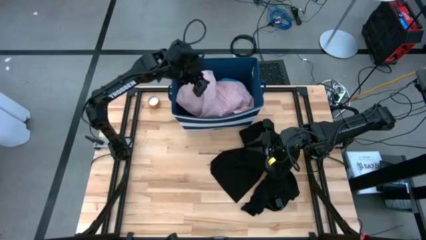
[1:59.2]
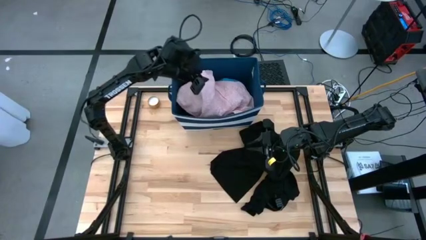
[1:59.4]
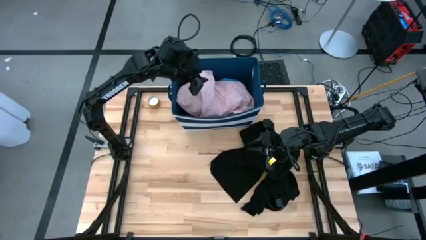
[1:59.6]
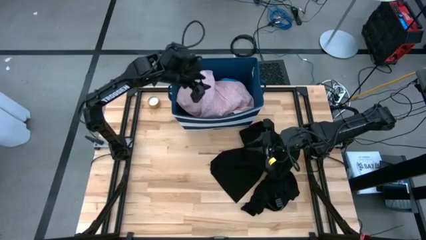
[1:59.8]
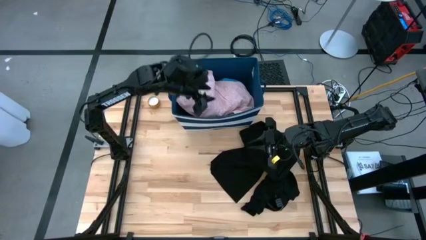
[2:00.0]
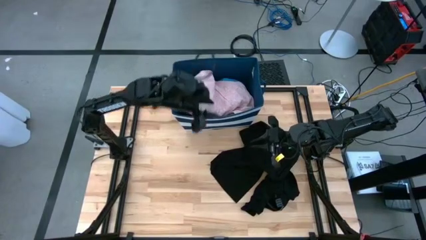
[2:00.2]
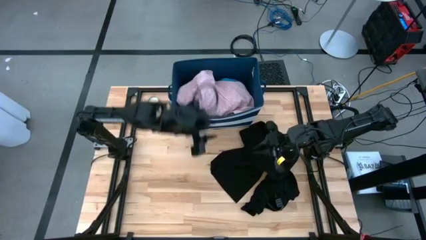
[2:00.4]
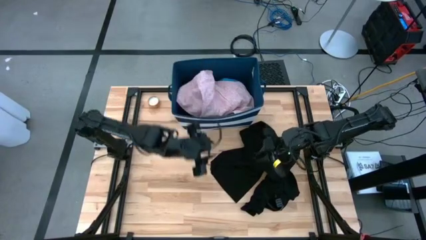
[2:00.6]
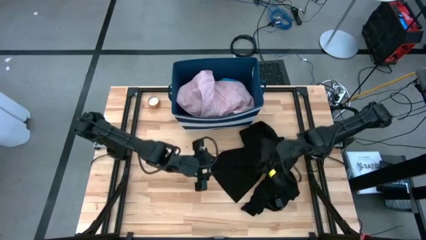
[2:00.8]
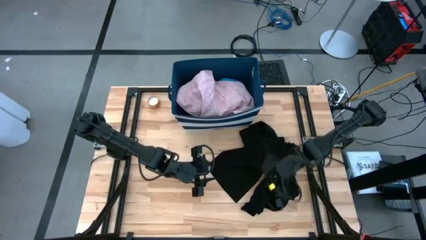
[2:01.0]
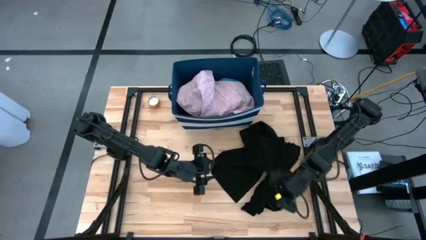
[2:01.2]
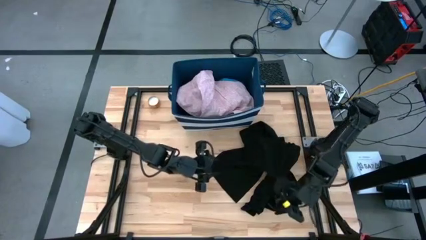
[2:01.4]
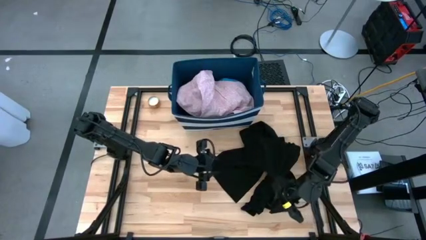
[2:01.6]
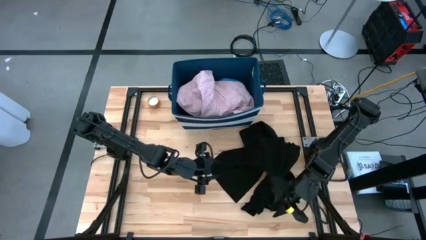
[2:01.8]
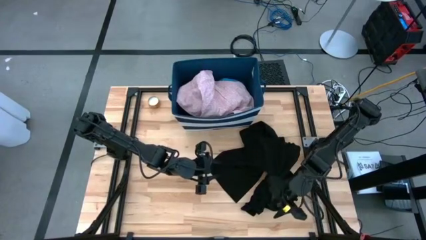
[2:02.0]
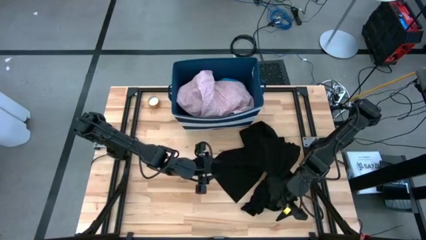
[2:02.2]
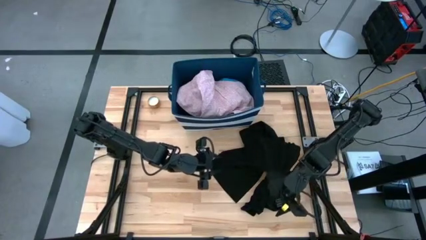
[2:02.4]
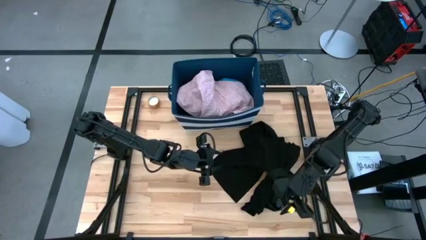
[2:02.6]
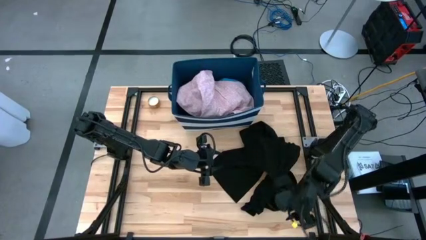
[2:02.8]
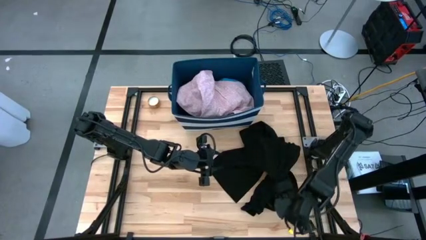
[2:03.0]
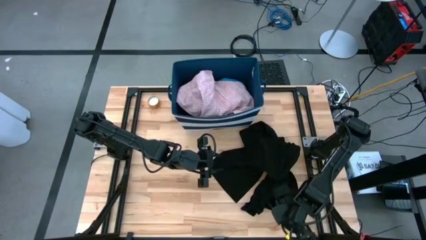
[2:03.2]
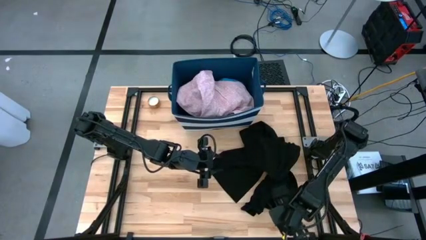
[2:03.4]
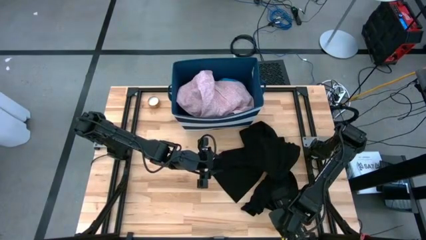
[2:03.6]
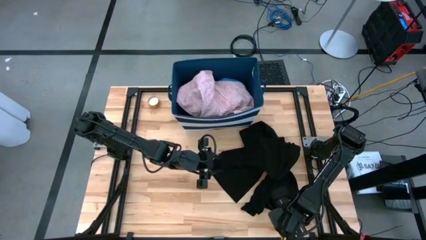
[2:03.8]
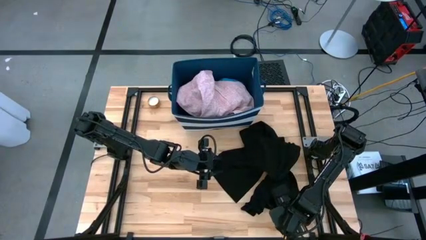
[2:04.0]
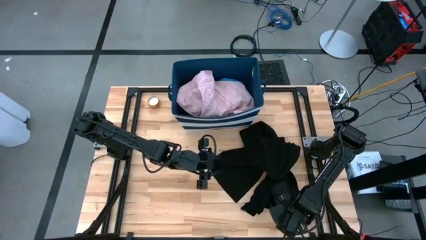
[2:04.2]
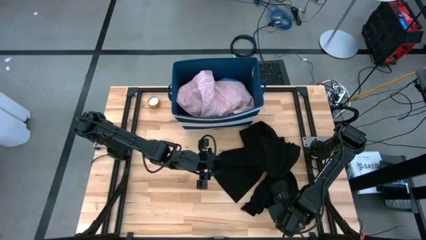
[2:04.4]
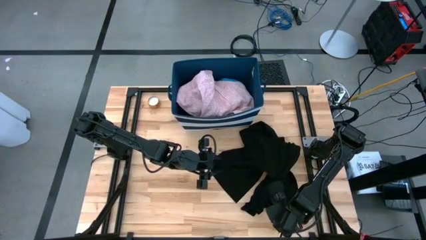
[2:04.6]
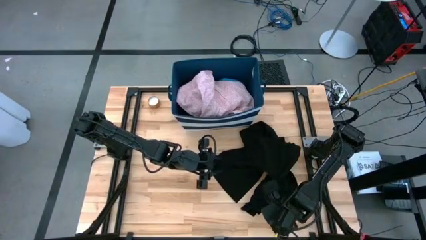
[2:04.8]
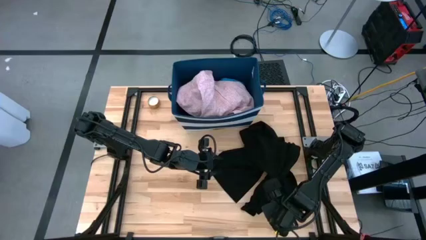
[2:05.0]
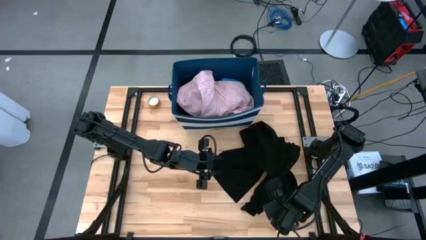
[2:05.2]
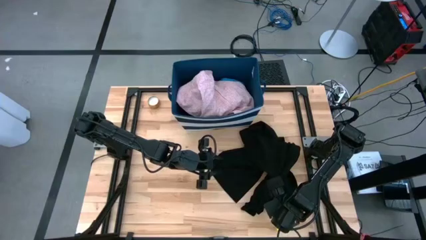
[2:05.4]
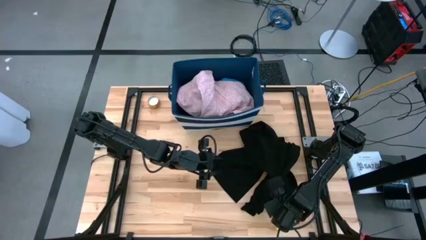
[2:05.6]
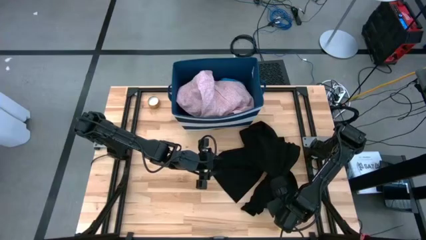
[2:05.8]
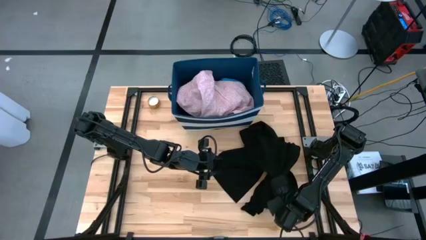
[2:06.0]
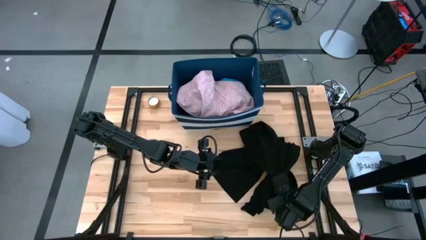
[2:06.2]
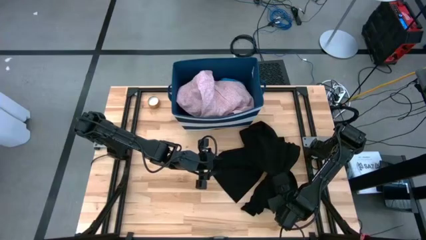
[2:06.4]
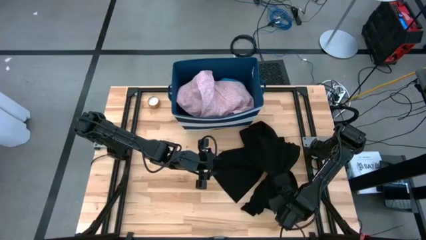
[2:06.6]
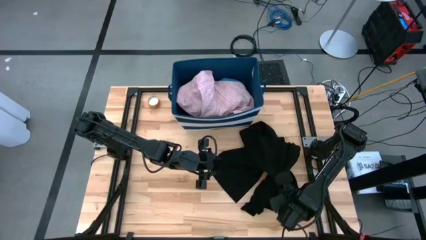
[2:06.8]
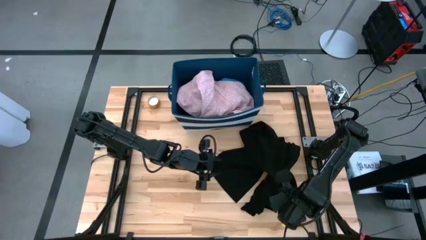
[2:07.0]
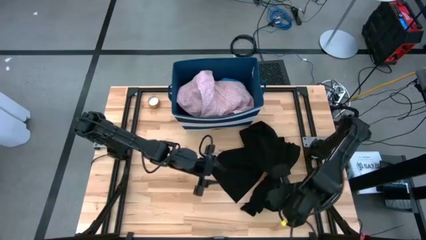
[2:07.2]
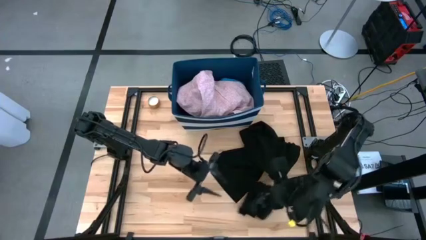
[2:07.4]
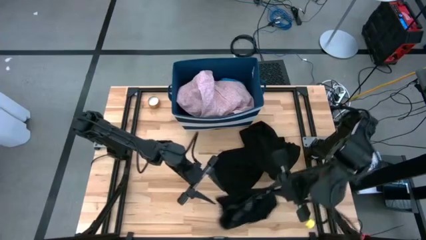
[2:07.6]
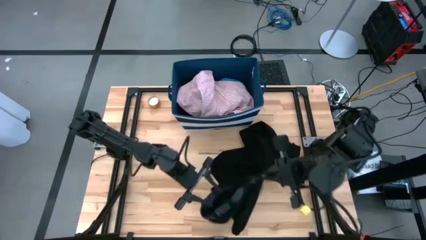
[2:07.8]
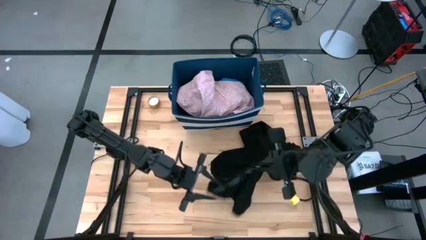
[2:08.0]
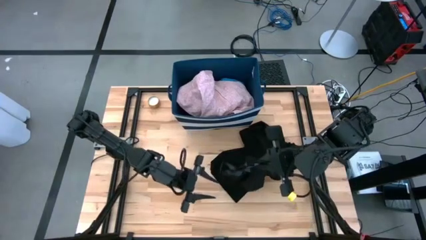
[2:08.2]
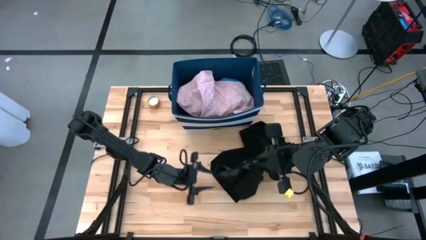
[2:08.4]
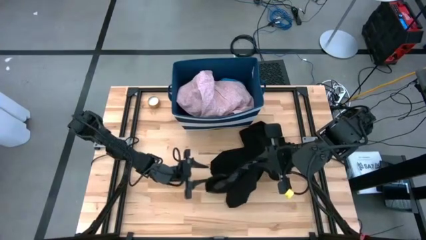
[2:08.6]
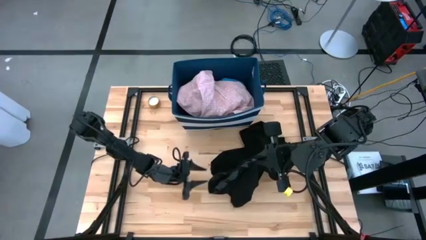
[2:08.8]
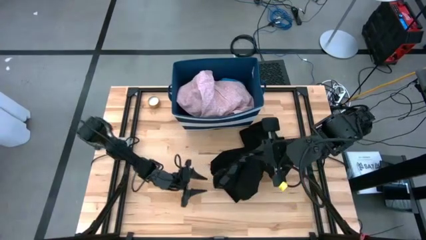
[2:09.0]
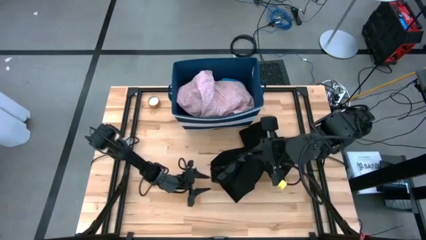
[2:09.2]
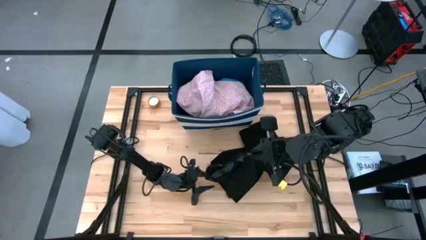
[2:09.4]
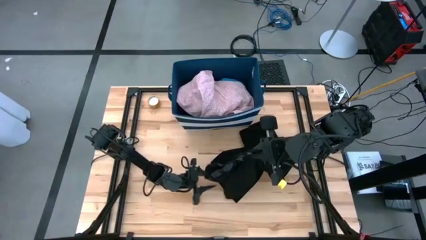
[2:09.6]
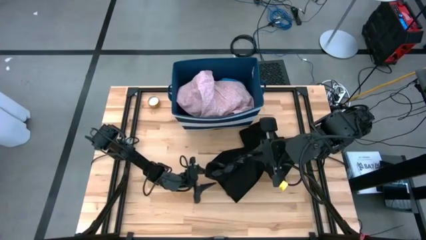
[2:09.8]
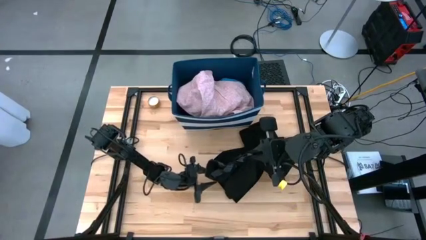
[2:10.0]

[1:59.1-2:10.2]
Task: Sort clothes
Fold the black underwear

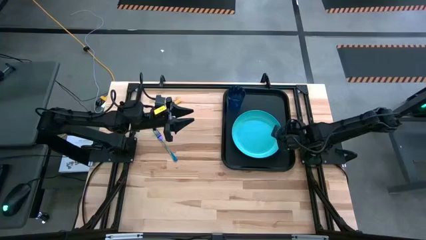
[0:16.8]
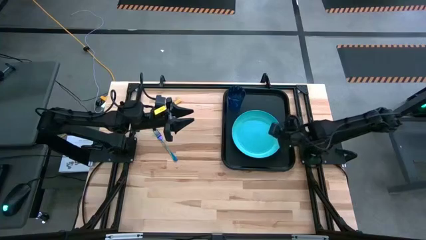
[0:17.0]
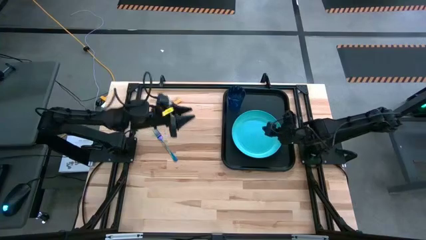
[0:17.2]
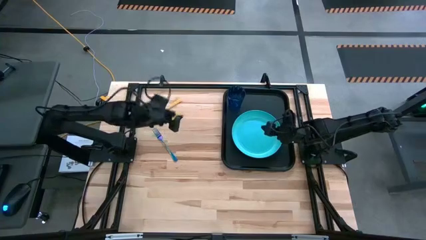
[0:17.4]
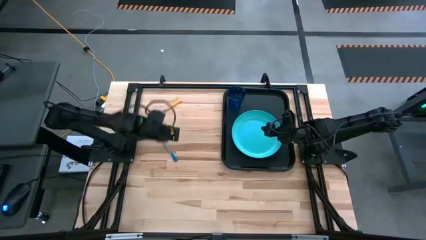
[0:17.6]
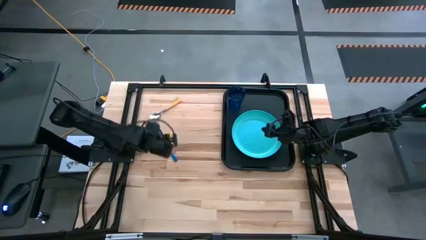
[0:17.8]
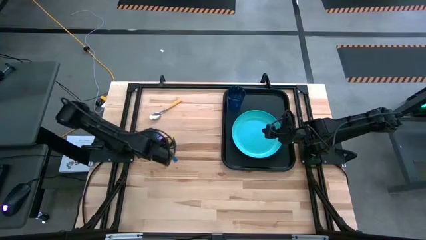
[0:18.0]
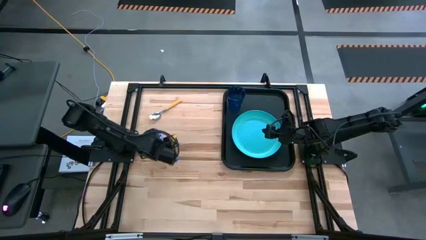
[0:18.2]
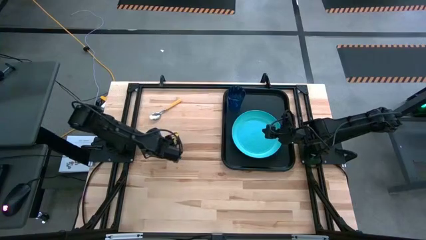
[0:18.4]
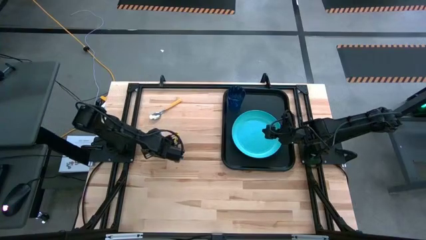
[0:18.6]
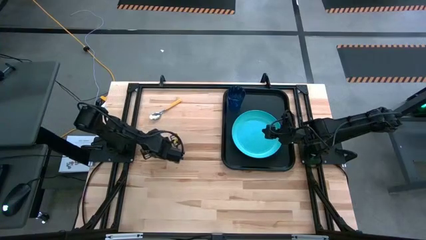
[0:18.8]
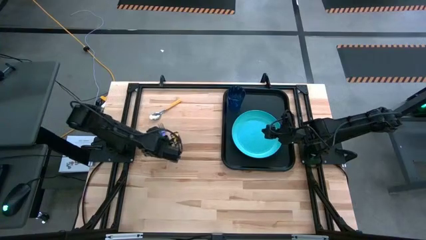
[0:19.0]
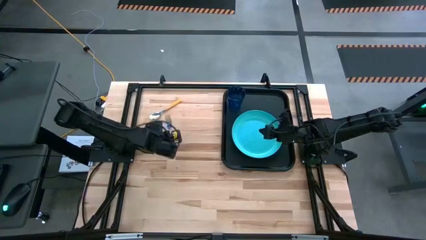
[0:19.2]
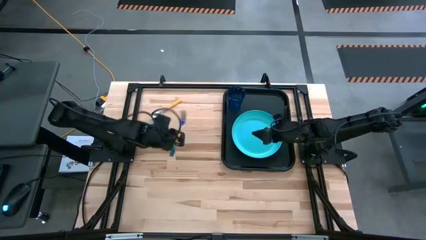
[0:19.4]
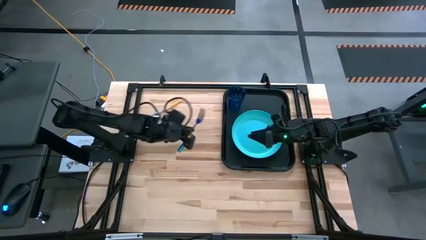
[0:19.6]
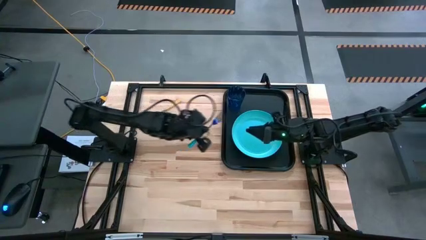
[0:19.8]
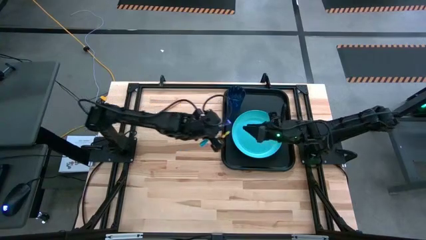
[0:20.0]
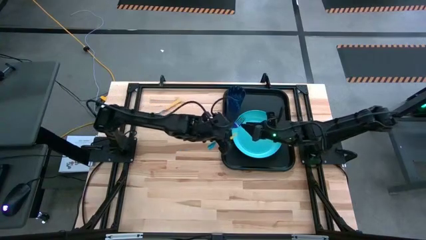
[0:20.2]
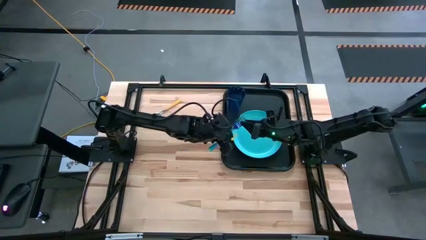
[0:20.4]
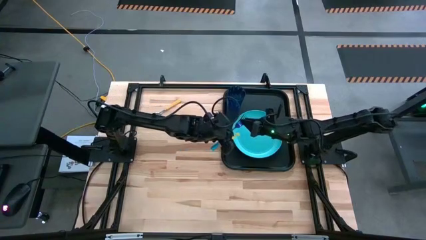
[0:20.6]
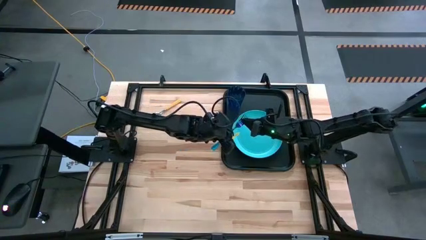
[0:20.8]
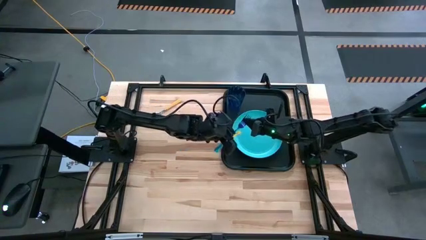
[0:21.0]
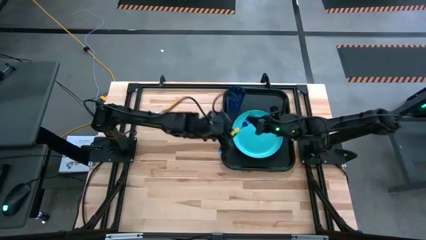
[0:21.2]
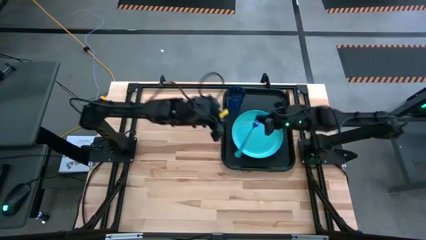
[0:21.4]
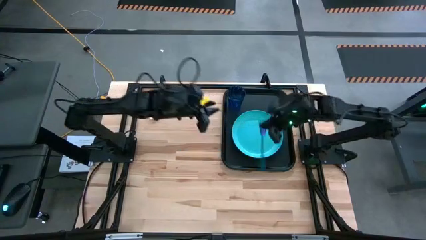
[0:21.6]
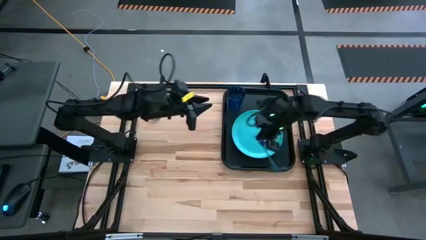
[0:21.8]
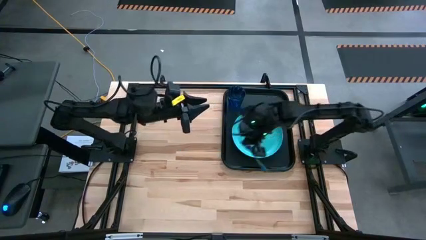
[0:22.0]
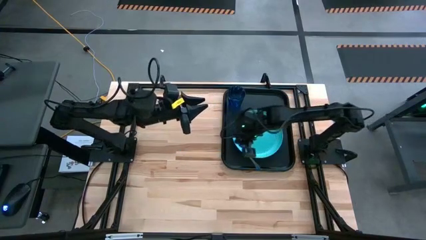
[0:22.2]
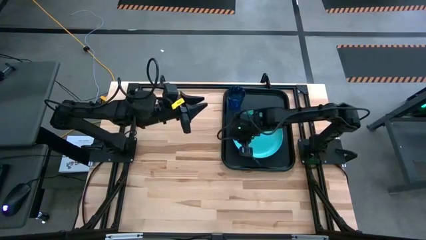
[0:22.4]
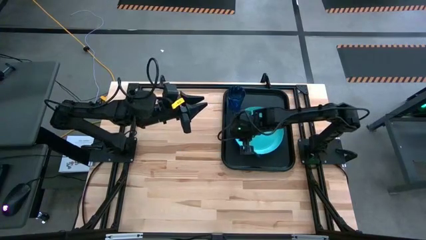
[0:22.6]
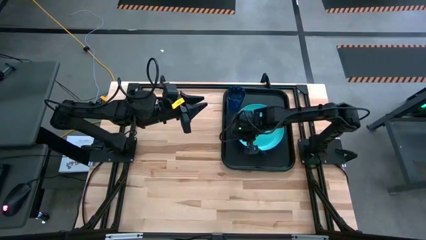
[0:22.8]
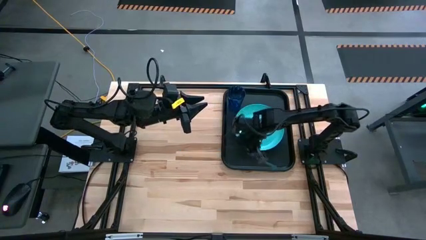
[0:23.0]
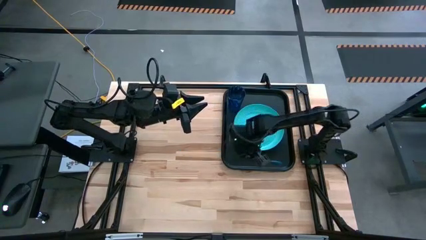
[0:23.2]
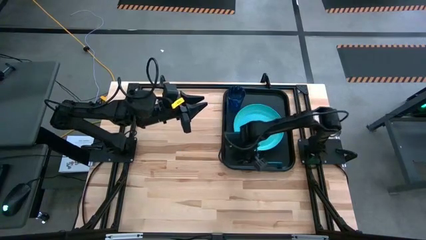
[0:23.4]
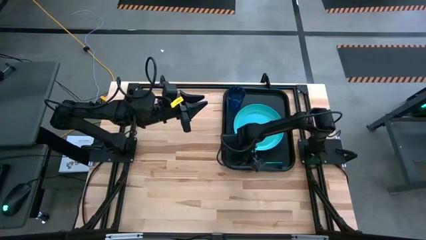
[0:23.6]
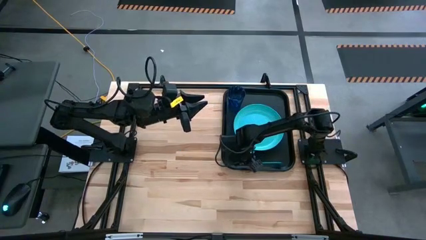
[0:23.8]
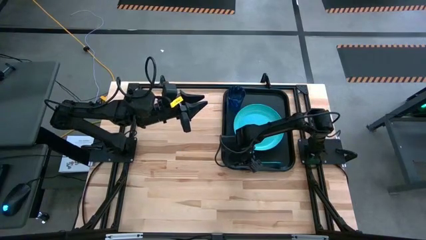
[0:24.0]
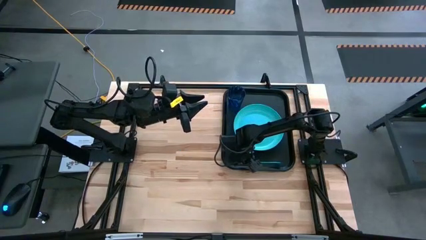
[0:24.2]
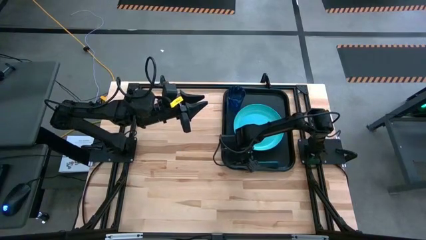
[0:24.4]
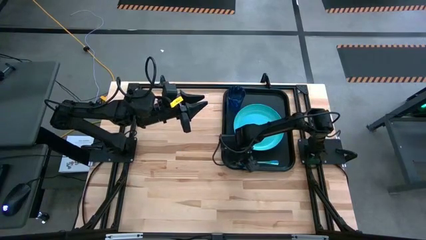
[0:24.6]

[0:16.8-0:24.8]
Task: Pick and place plate/cup/fork/spoon on tray
Put the blue fork on the black tray to bottom of the blue plate
